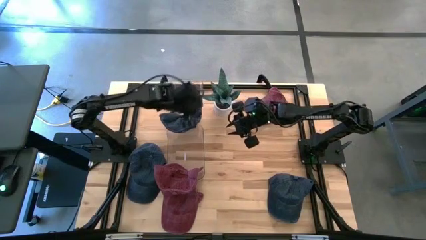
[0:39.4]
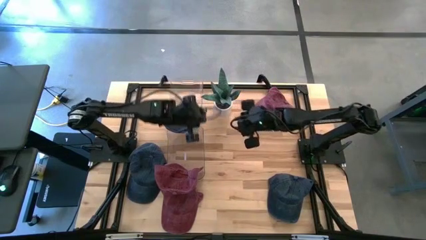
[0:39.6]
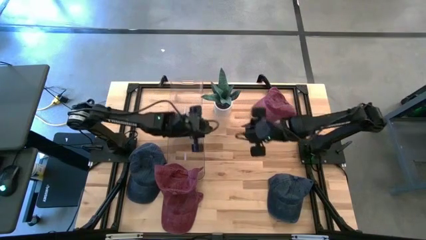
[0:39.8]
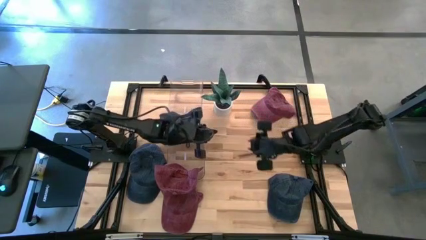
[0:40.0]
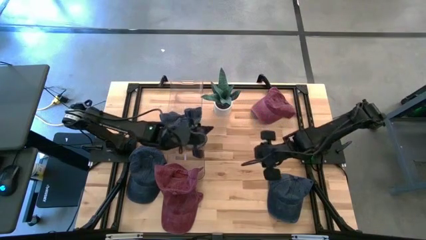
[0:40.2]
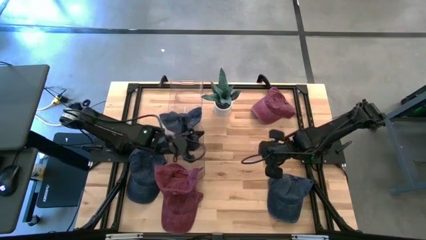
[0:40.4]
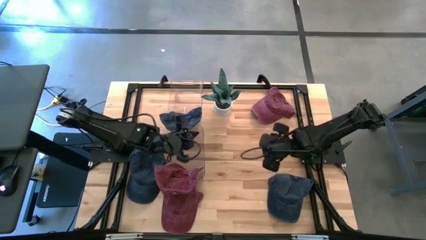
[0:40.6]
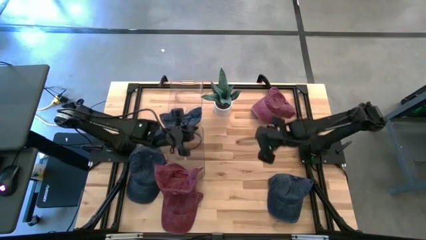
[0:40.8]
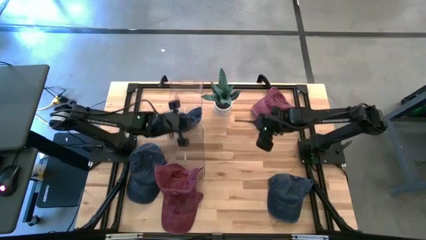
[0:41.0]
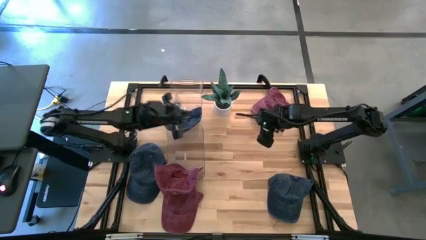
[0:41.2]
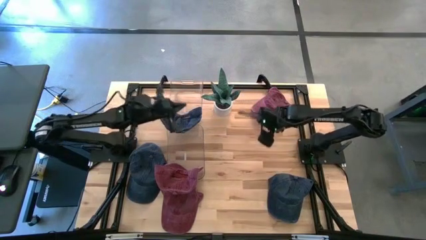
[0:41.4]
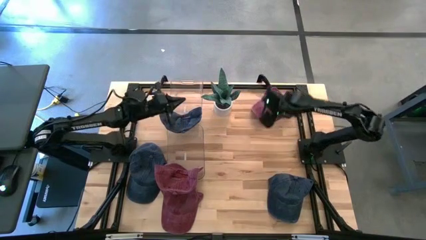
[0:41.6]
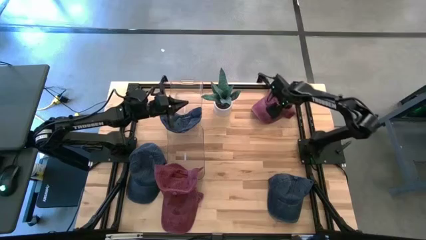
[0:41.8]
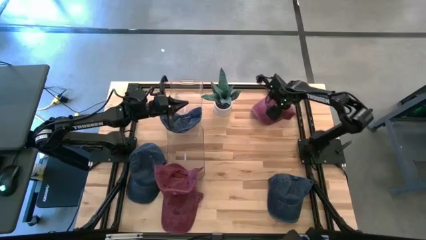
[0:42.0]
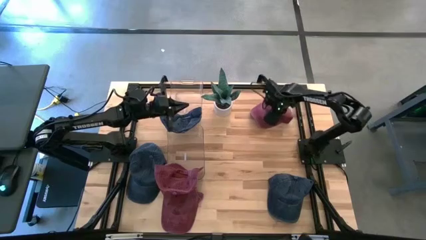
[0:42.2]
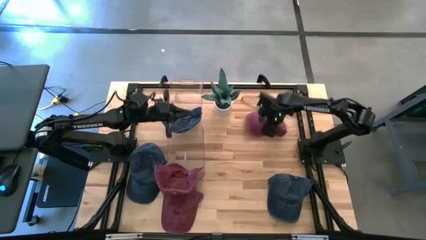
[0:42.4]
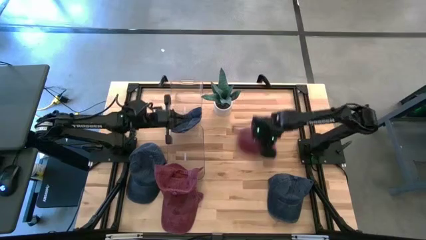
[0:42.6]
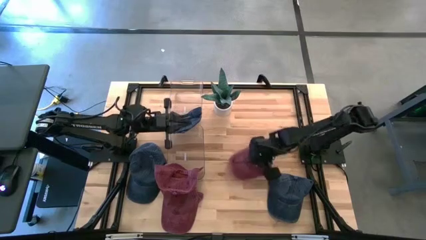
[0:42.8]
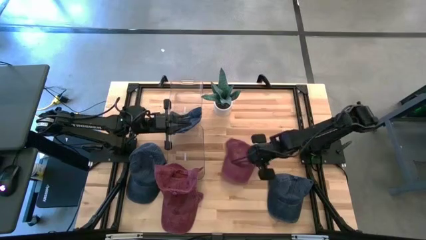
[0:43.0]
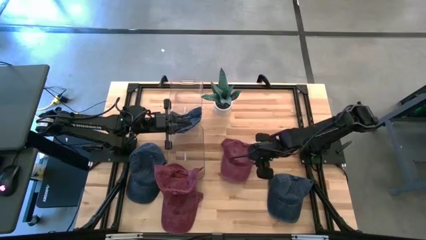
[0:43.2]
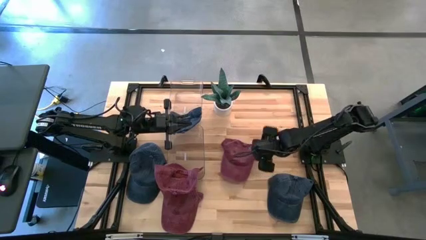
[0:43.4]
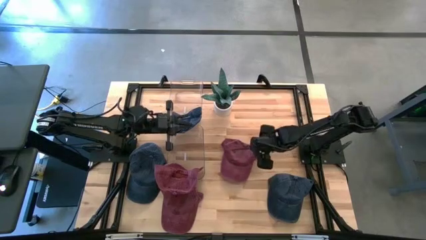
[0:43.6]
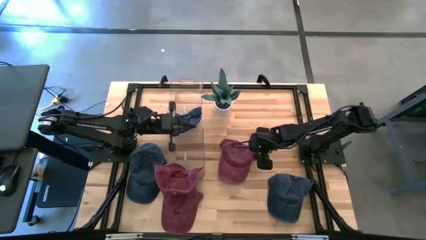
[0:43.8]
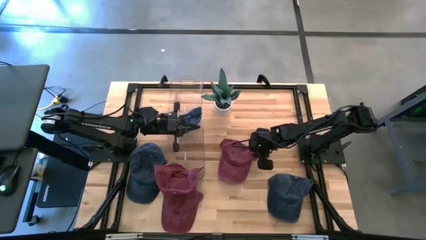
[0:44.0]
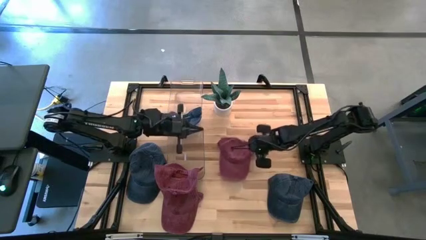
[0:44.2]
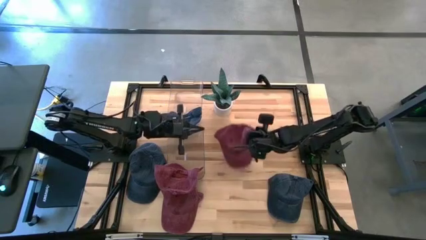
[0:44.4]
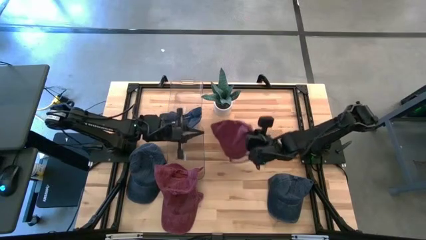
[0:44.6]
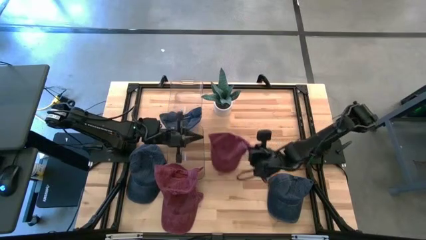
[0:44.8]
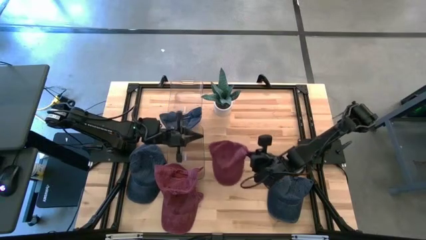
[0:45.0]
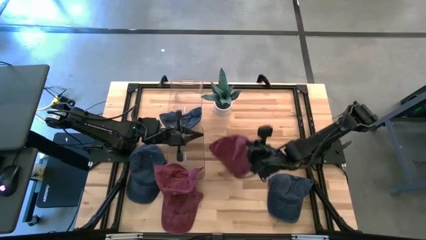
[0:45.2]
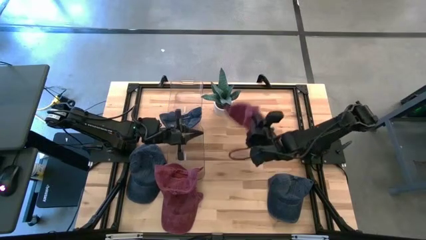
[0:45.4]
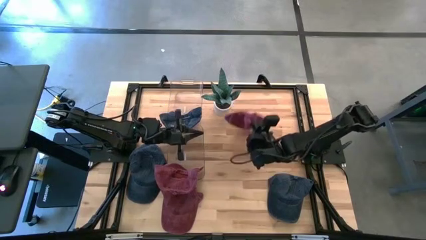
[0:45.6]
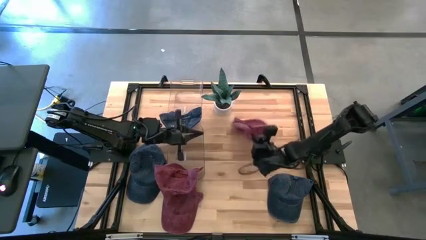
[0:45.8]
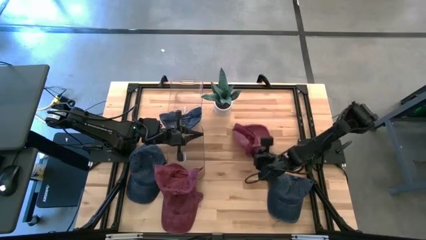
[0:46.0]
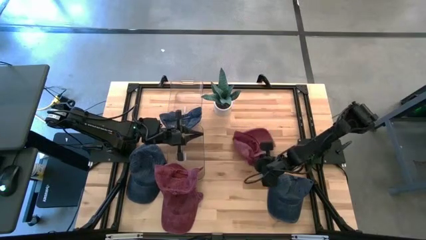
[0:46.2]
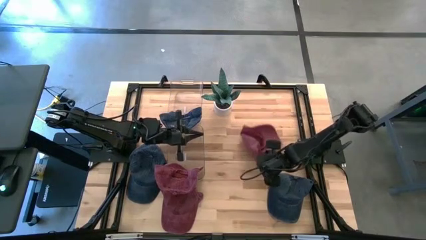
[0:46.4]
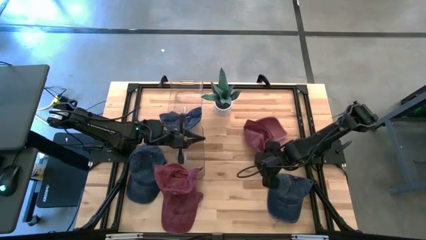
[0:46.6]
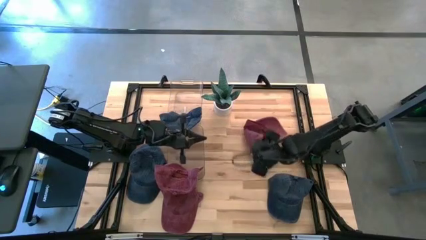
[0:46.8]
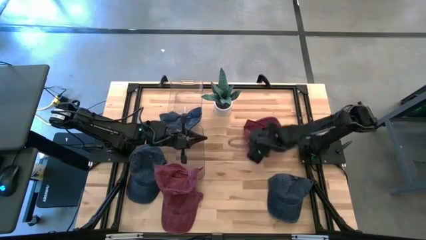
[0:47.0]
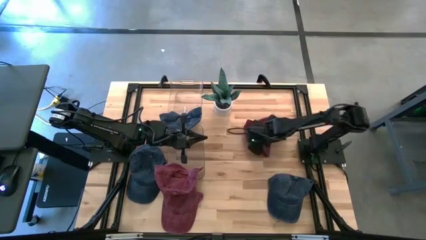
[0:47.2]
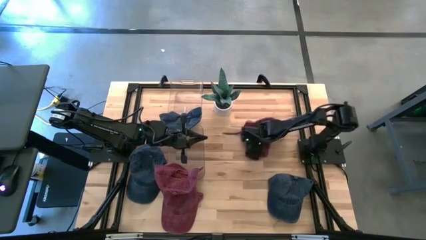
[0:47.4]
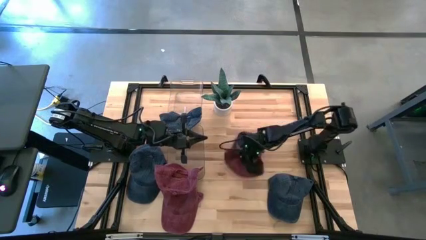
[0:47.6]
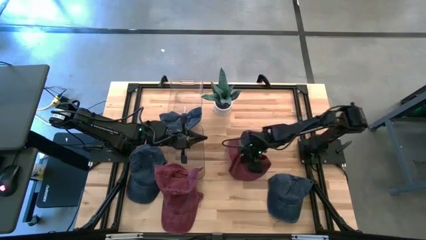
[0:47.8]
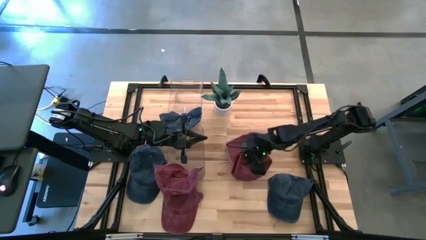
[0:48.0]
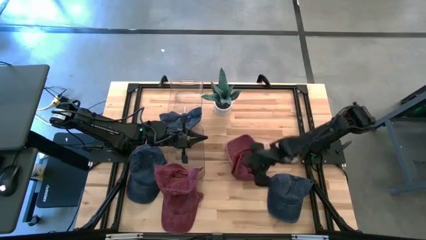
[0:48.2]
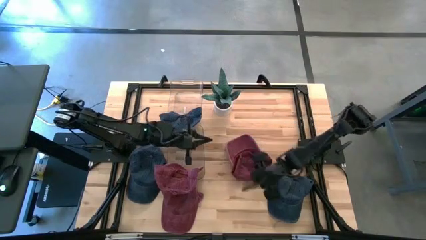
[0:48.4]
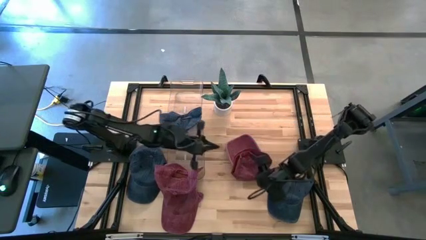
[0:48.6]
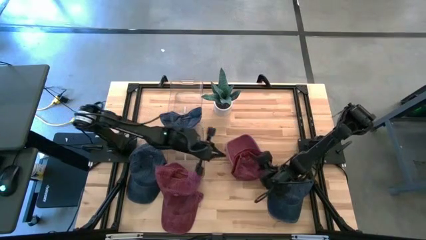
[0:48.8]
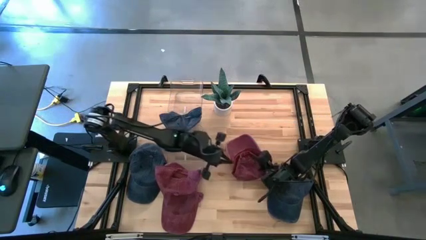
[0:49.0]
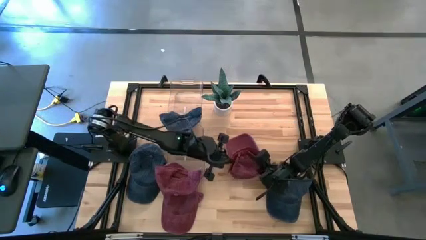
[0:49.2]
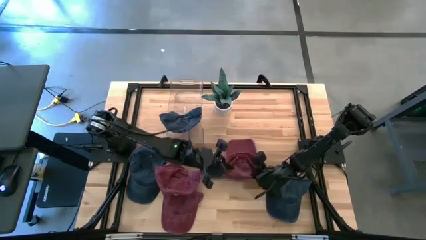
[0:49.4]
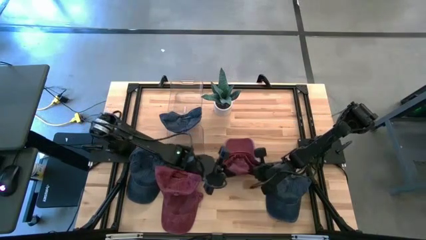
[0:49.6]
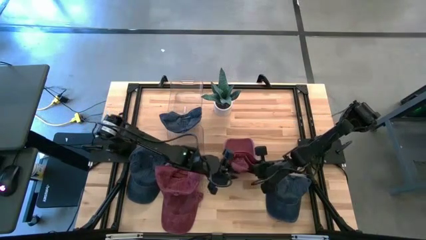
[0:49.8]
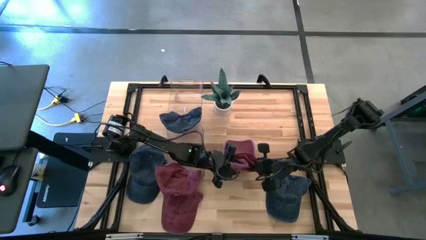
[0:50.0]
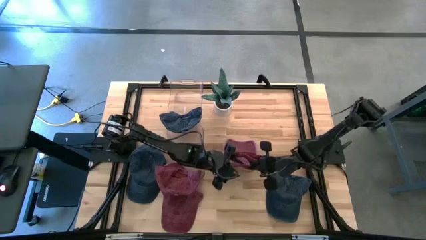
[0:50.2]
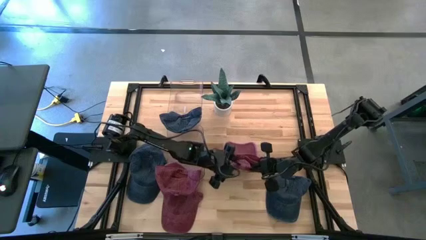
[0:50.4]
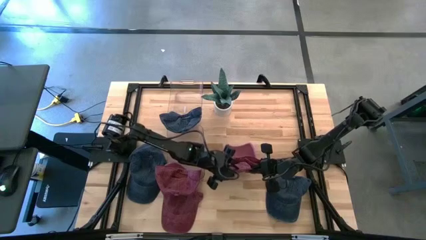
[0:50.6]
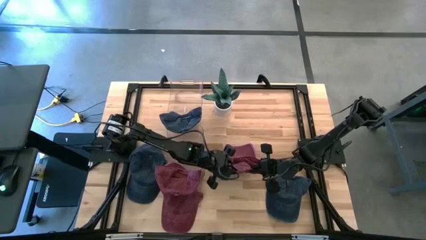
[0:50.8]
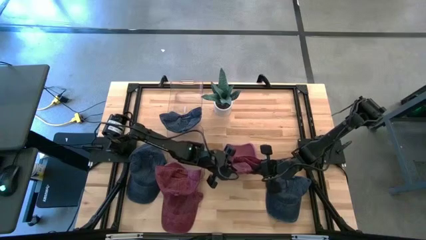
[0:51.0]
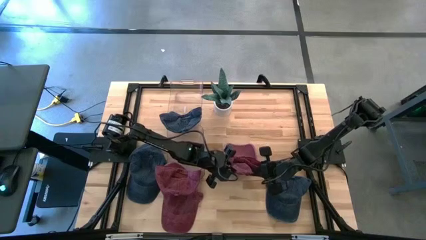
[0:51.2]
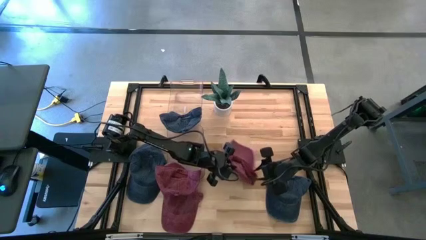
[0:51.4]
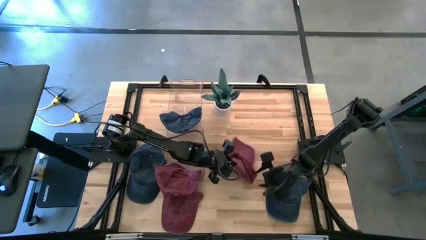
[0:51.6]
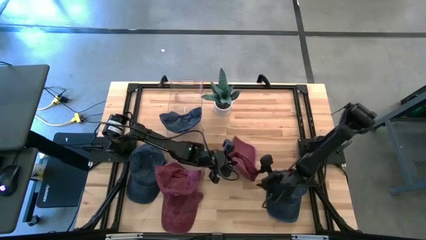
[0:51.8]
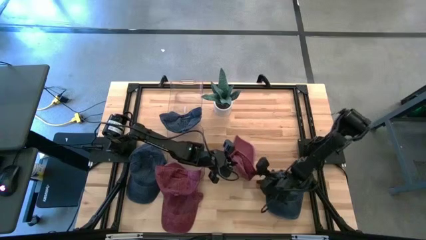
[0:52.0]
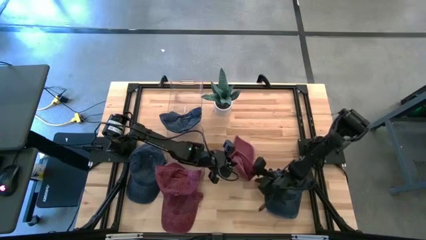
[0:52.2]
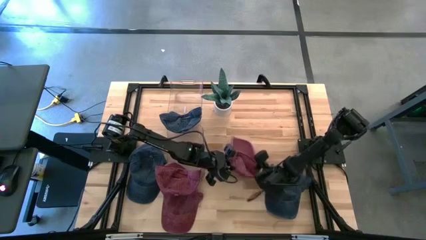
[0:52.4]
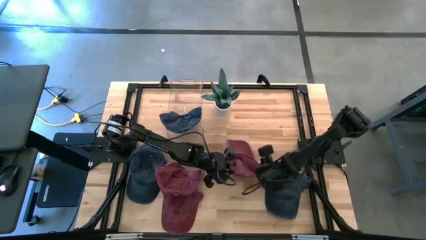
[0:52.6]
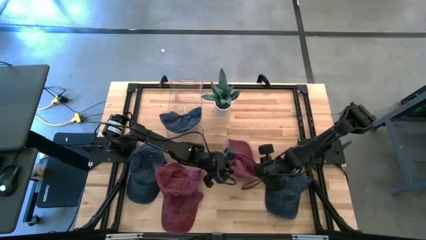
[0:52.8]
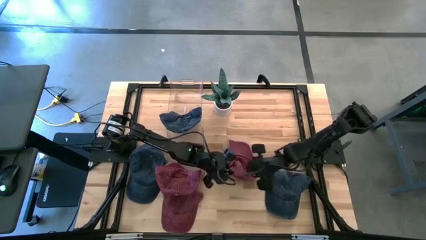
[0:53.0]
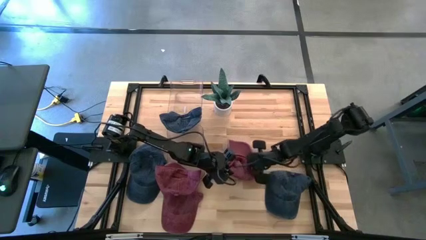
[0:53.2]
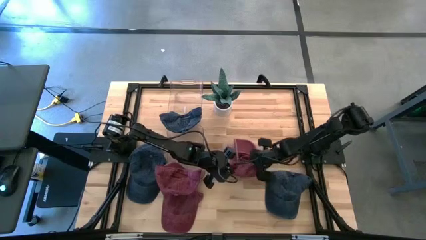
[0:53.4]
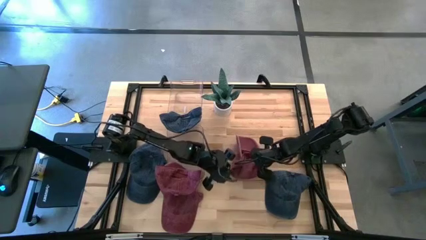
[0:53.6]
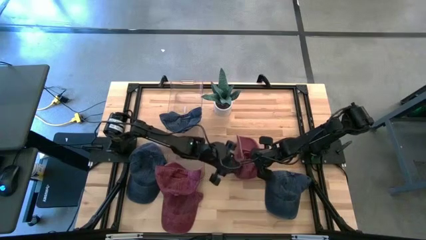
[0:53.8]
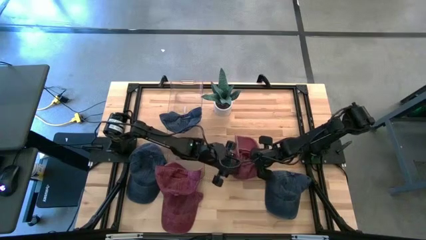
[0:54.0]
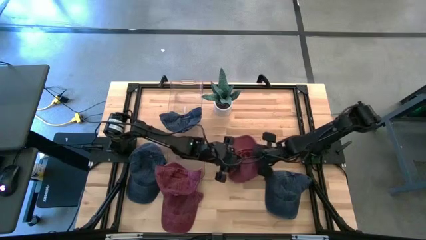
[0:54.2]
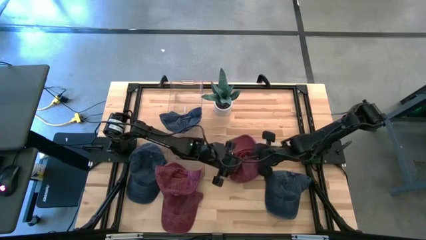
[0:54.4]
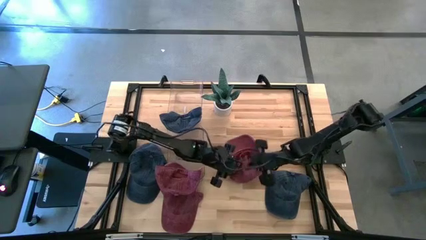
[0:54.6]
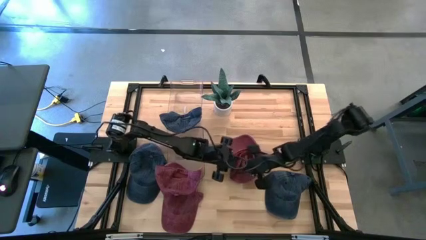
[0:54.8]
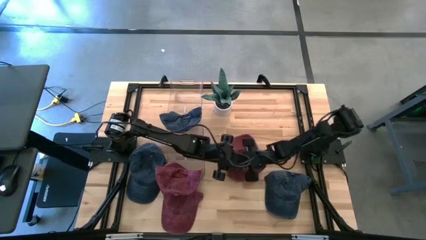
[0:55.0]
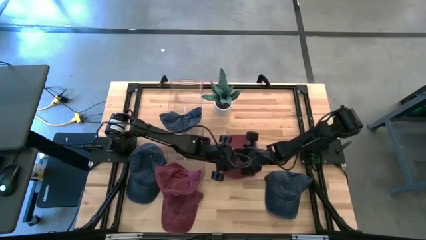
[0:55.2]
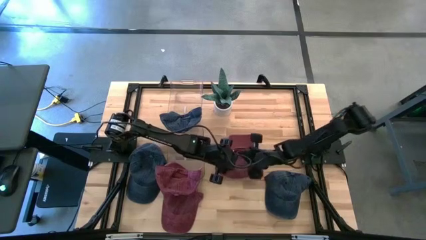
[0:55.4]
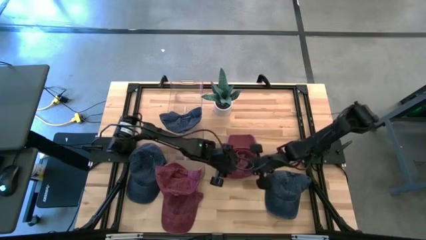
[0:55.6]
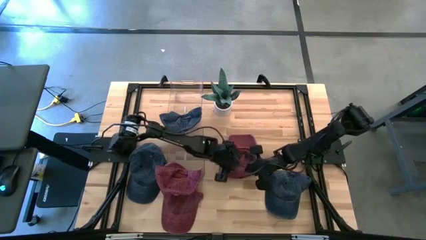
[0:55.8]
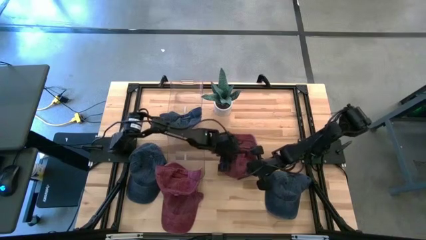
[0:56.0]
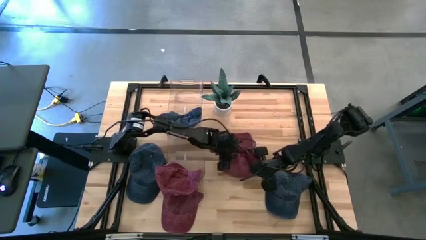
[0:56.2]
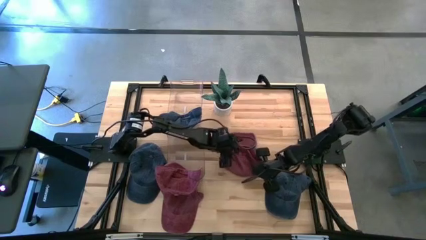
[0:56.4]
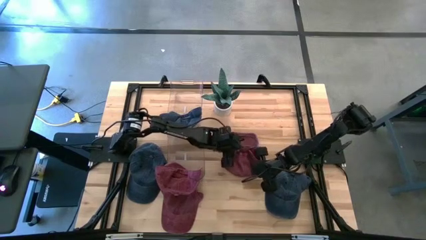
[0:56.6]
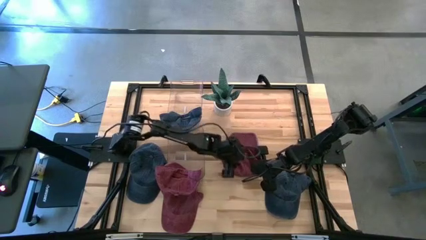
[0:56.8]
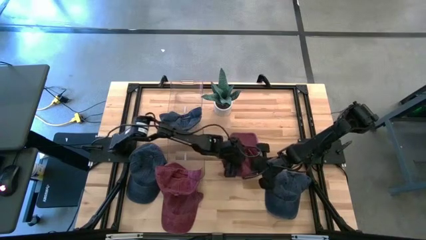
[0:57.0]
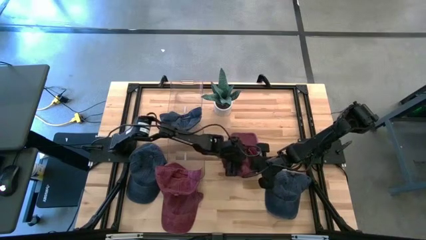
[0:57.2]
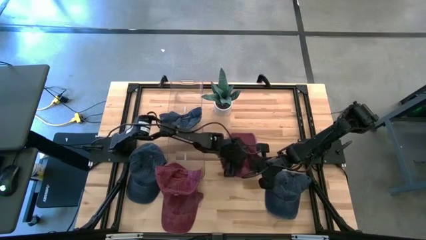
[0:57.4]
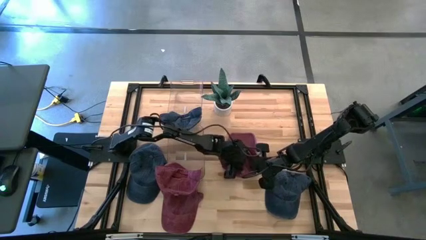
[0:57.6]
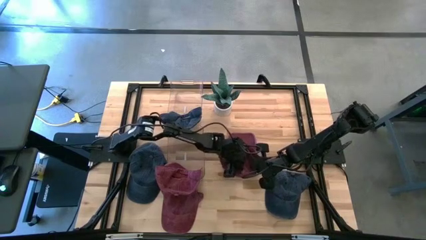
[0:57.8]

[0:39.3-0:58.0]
Task: Pick & Place hat
Put the top red cap into the bottom transparent bin
